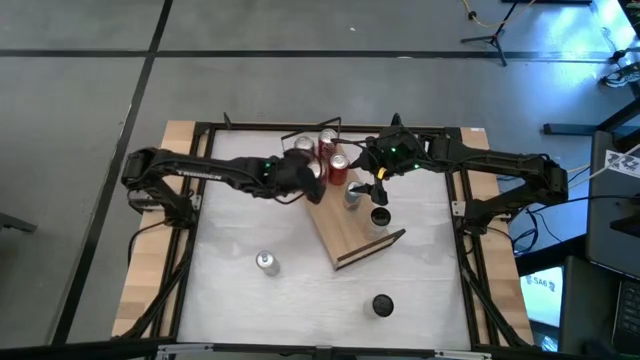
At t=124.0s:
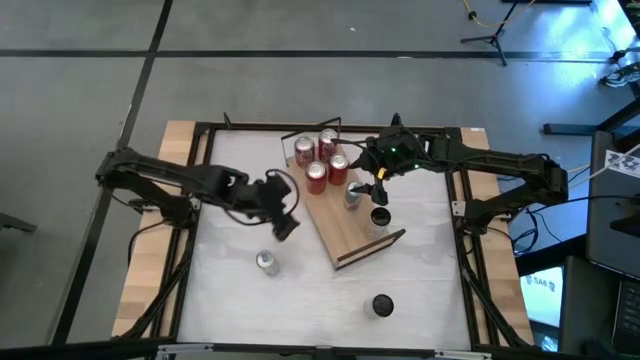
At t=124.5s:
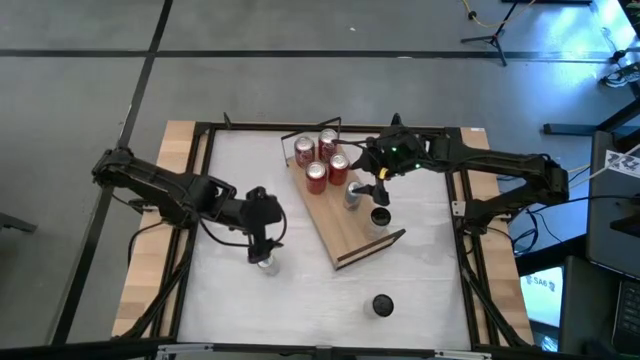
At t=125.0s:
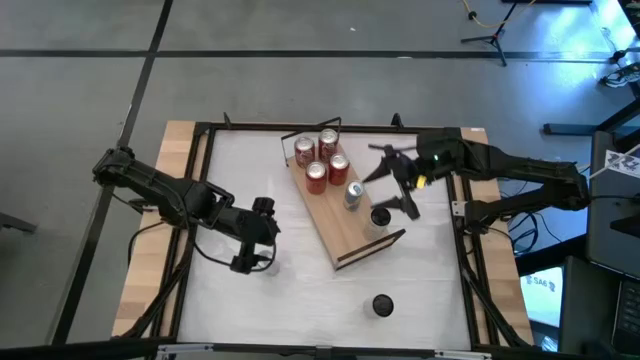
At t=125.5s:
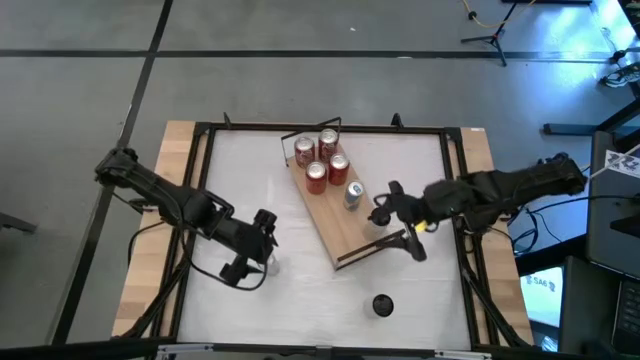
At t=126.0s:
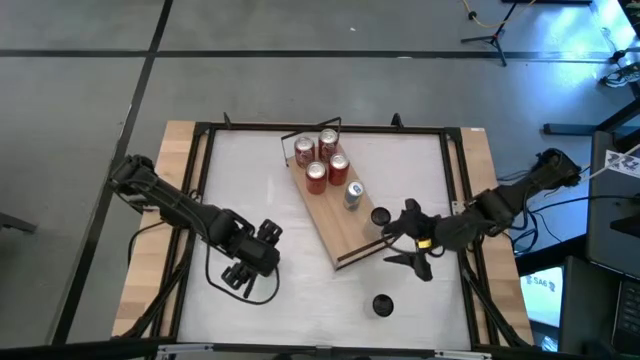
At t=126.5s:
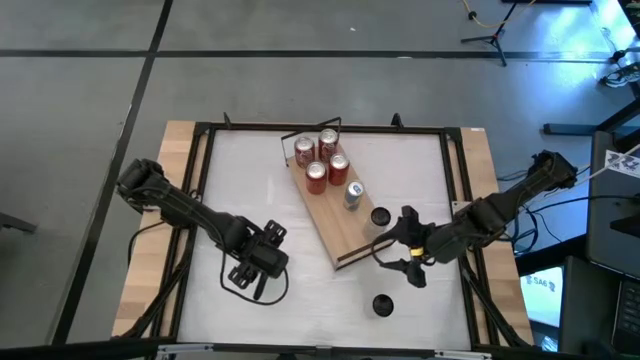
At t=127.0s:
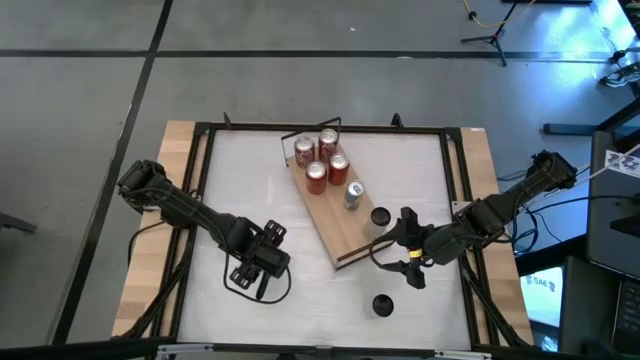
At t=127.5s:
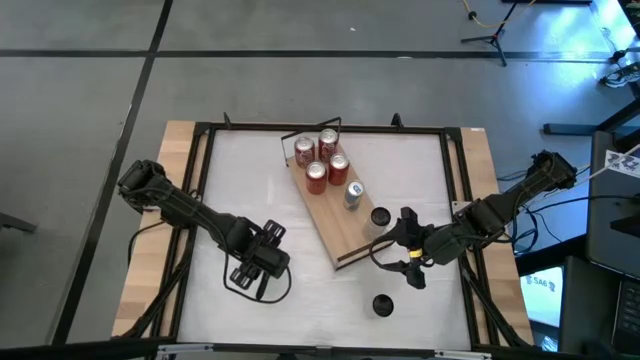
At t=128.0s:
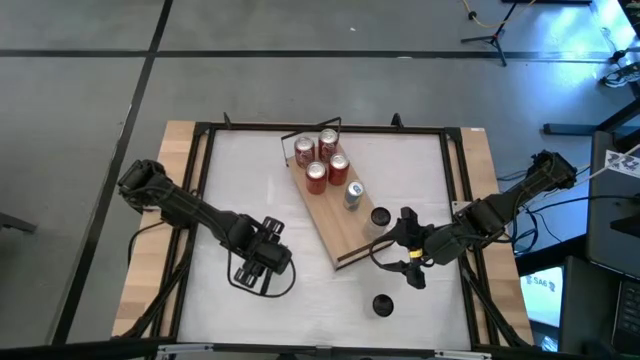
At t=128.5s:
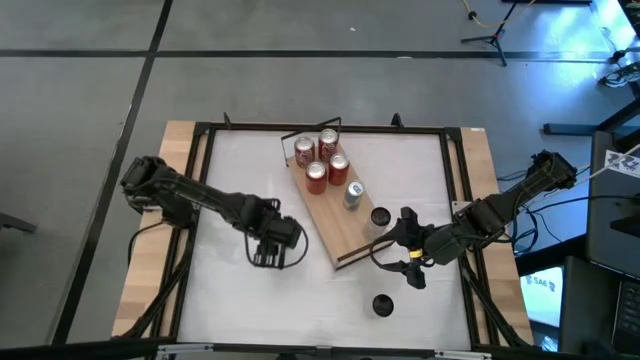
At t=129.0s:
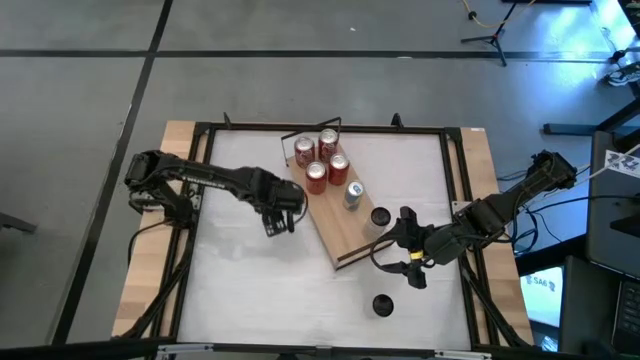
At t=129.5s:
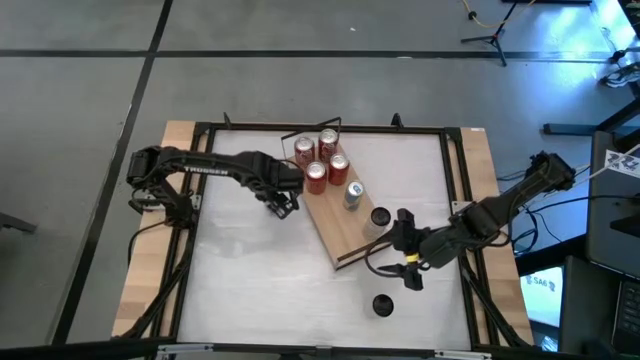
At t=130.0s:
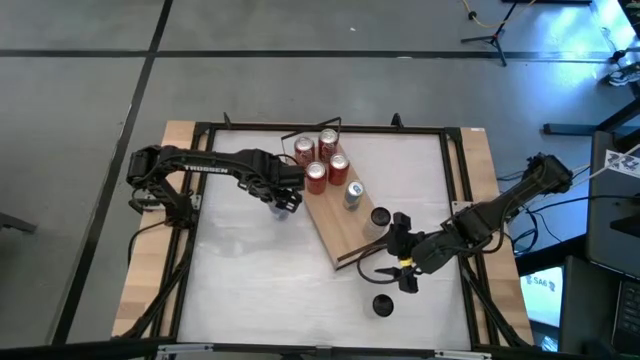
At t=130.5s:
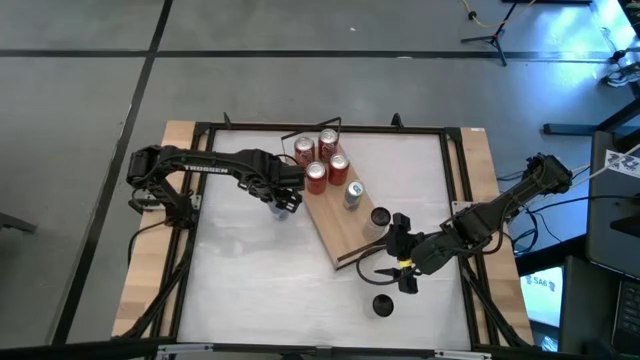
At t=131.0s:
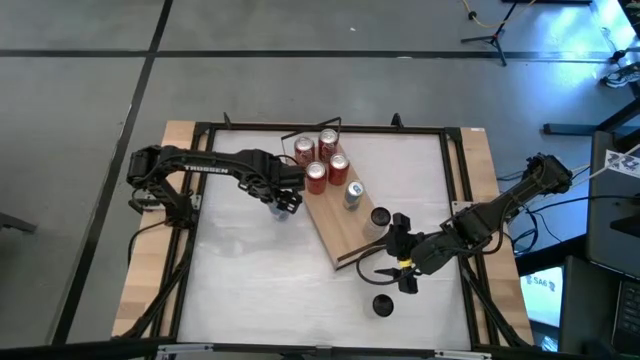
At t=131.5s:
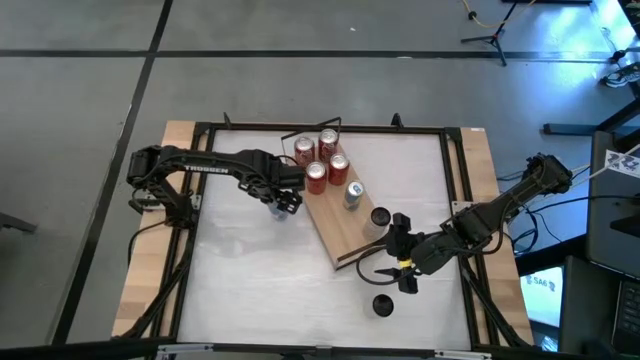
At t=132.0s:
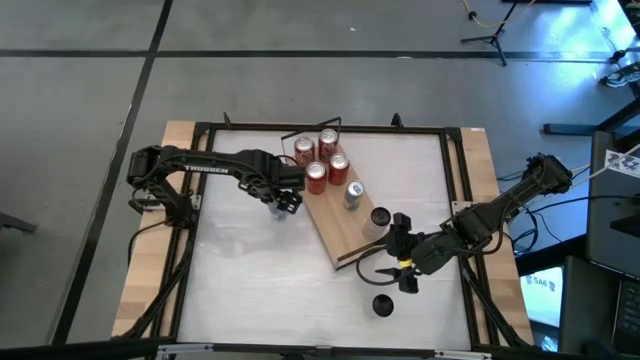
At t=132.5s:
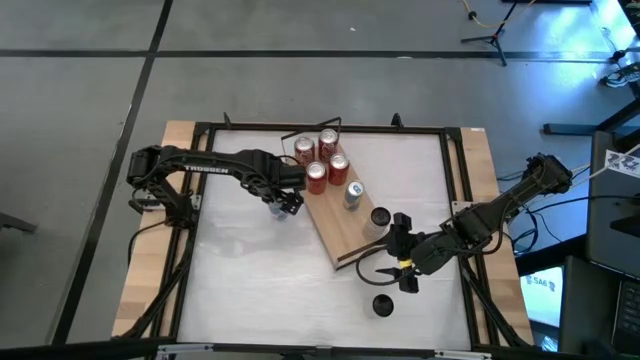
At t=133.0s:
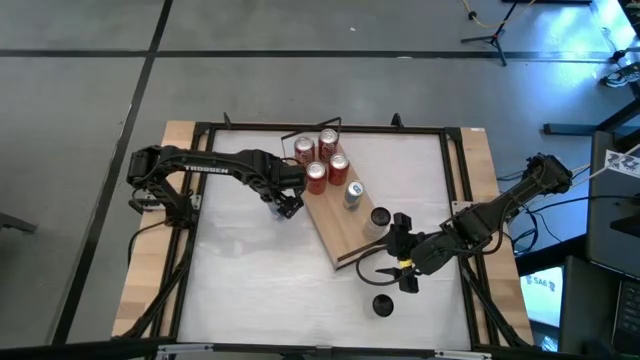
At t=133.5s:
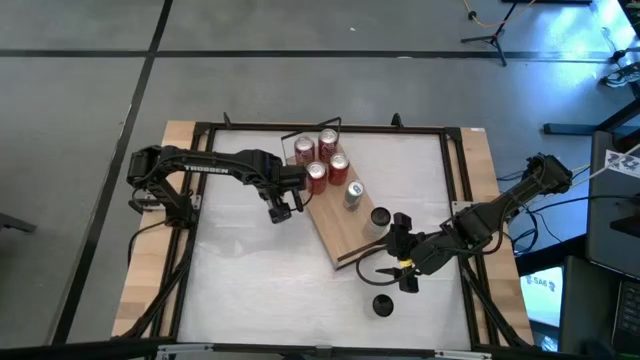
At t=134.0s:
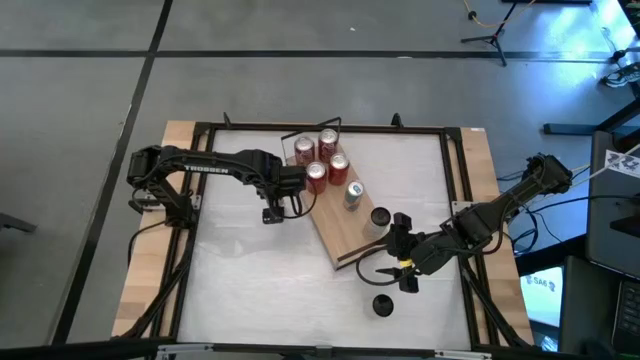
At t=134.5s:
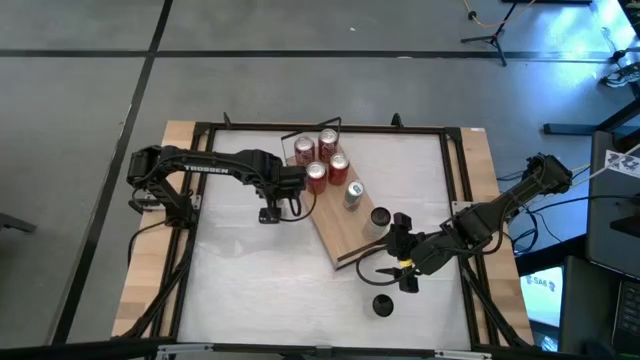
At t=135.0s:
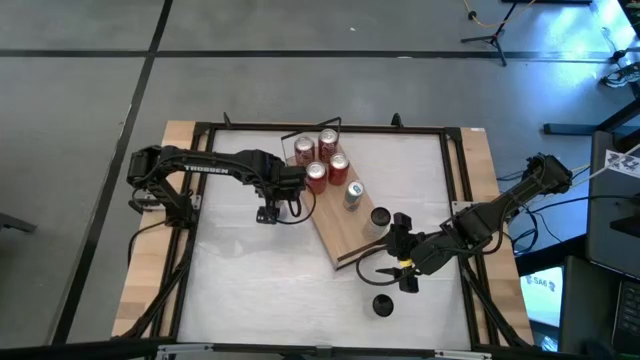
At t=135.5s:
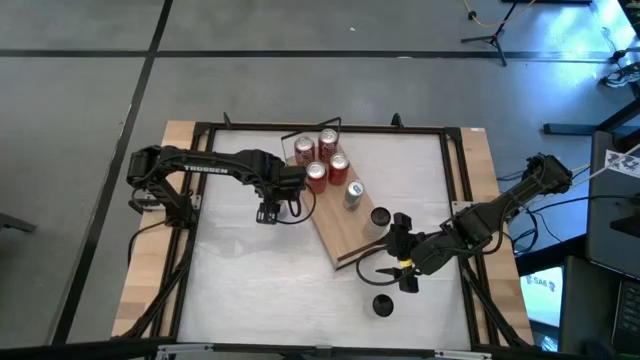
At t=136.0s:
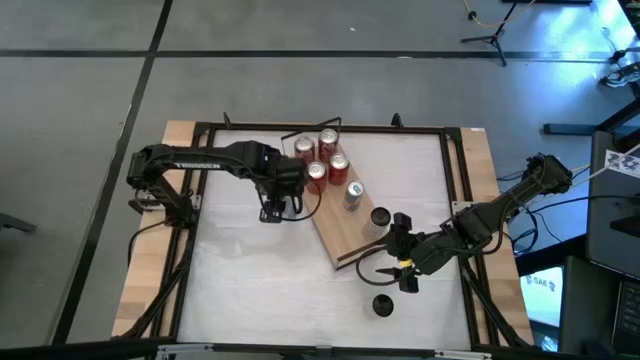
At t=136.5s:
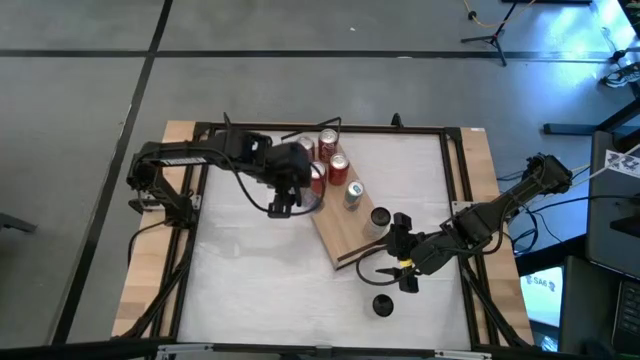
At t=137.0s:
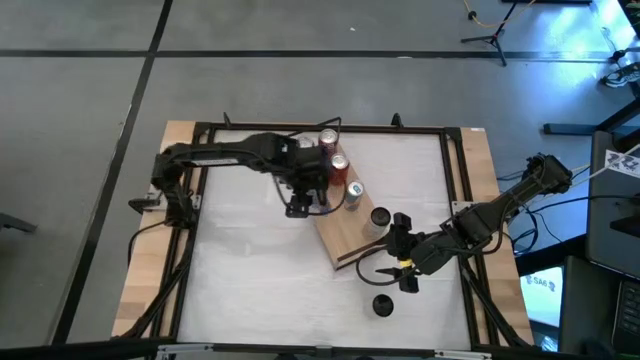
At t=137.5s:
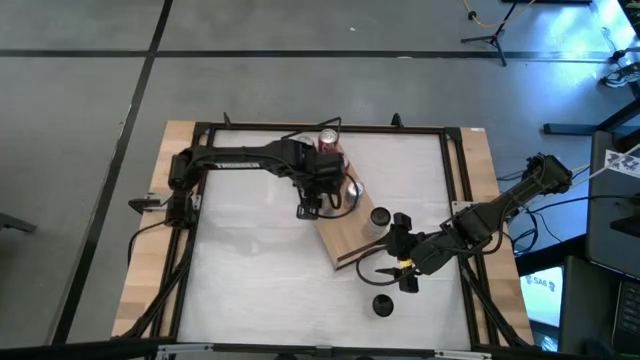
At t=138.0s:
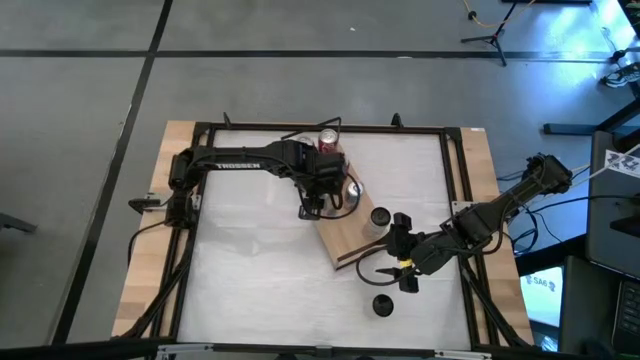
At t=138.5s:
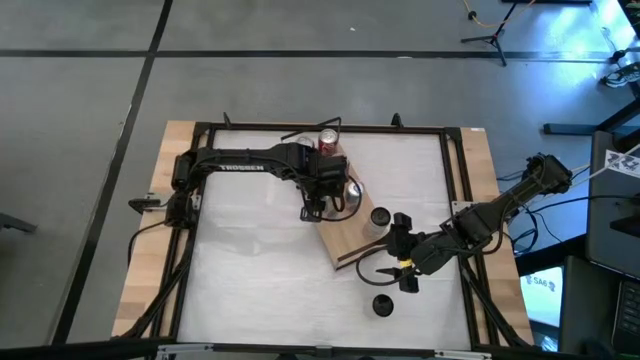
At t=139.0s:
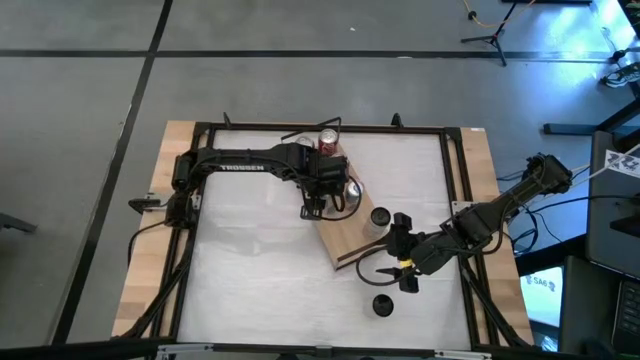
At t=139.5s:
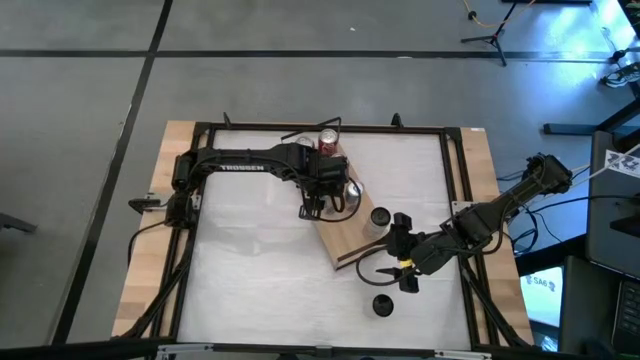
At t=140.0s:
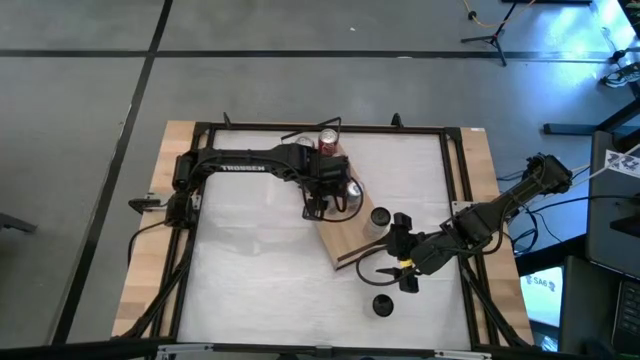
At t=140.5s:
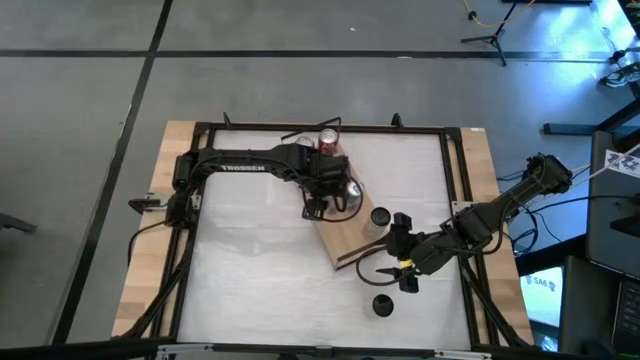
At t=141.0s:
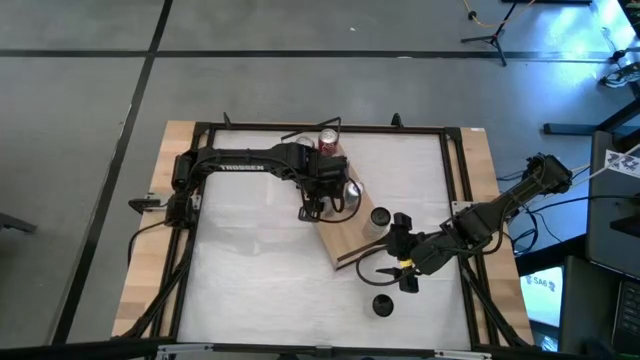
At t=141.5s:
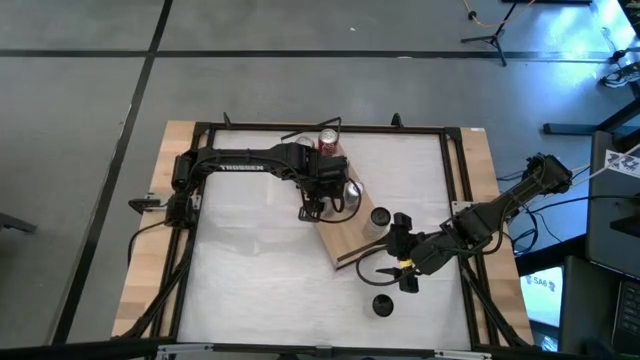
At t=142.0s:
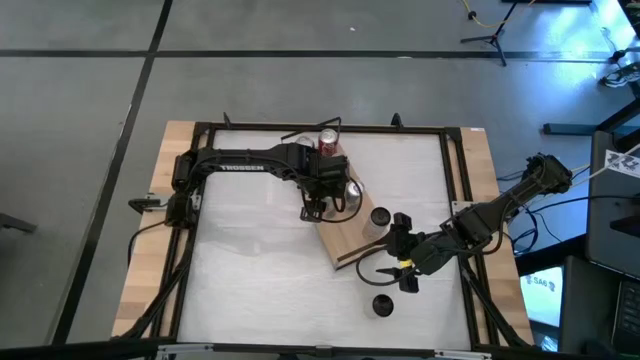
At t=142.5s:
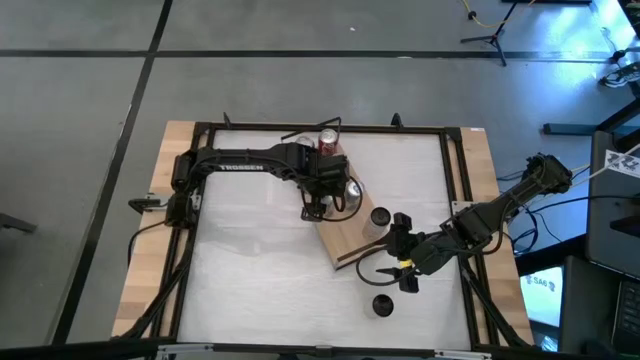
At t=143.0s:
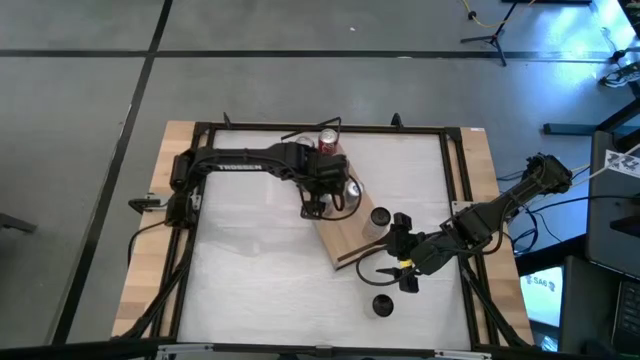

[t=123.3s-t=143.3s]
Task: Place canned beverage on shelf
Put the blue soda can on the shelf aligned with the other blue soda can

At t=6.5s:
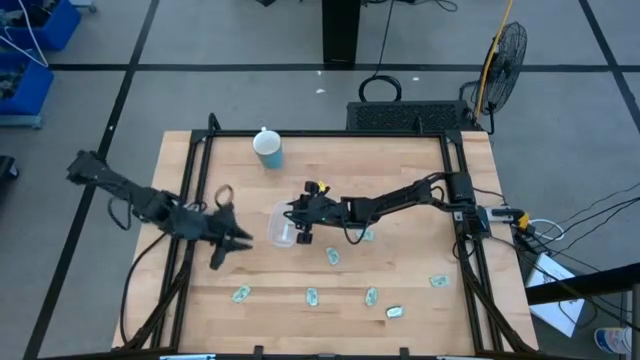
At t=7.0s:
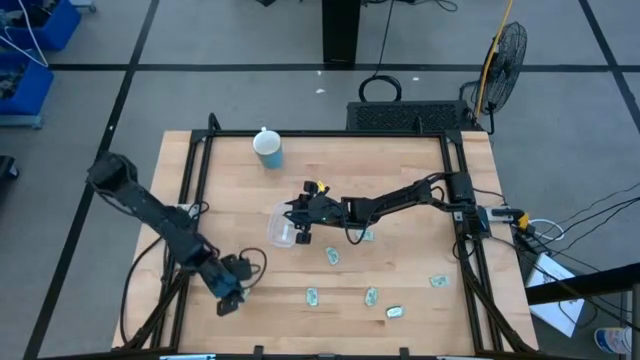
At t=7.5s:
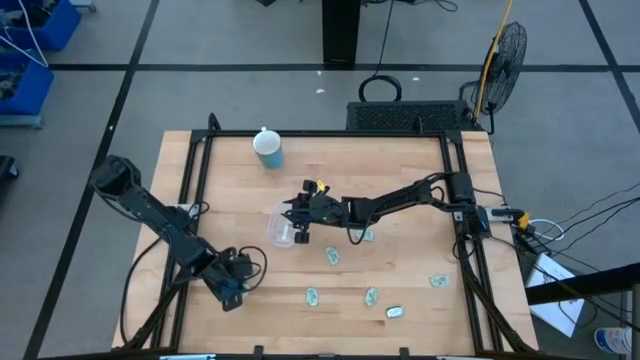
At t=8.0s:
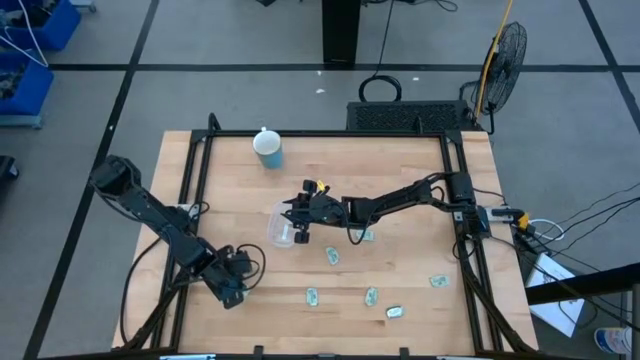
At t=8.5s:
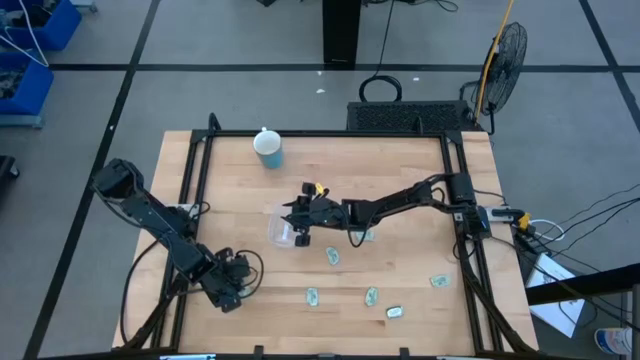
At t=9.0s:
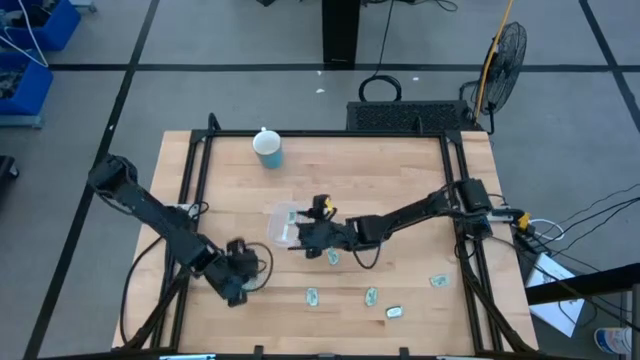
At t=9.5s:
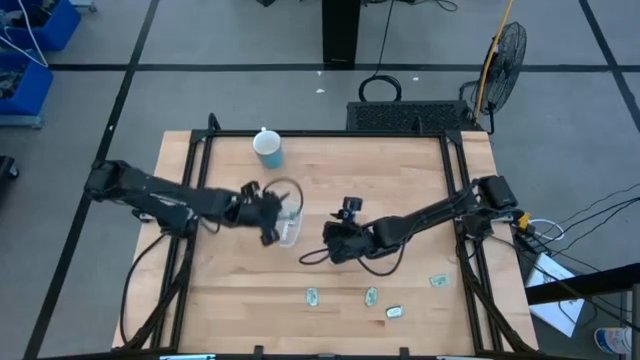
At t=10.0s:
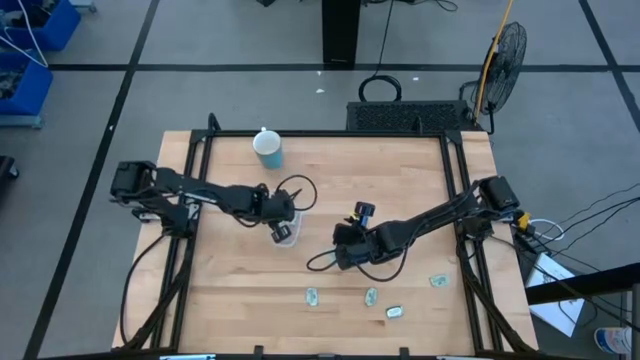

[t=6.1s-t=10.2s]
Task: Pick and place Stevia / Truvia into bins
Put the light green stevia packet into the transparent container
